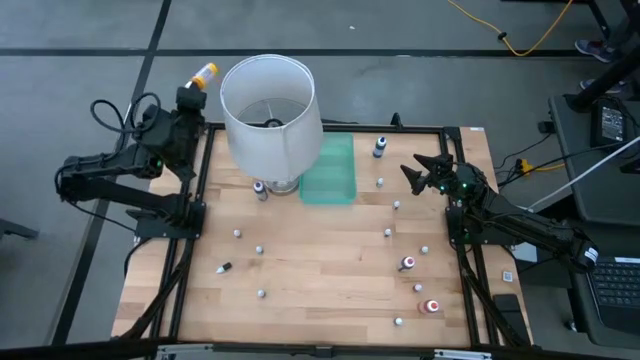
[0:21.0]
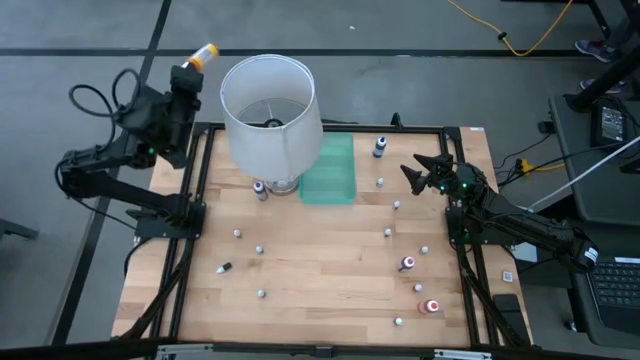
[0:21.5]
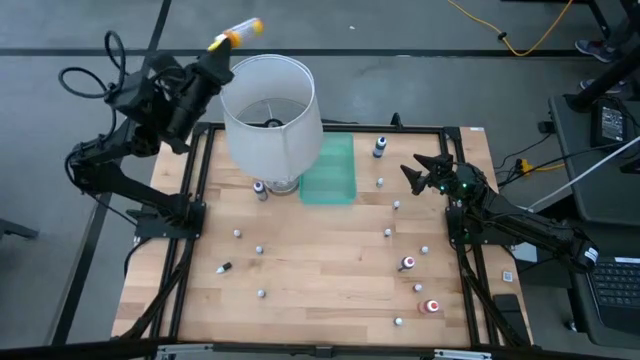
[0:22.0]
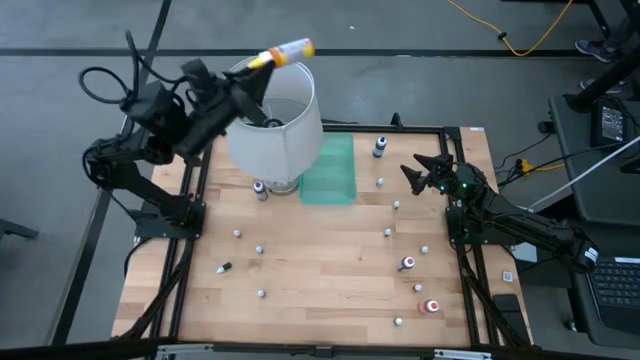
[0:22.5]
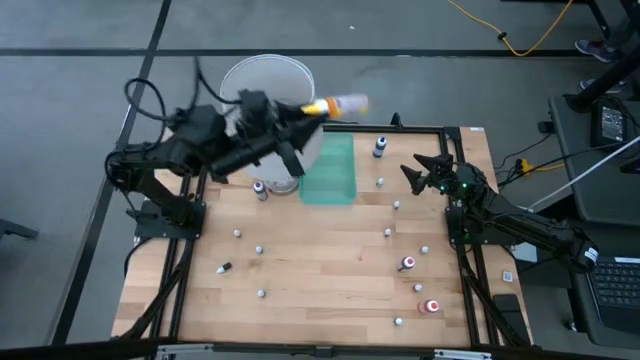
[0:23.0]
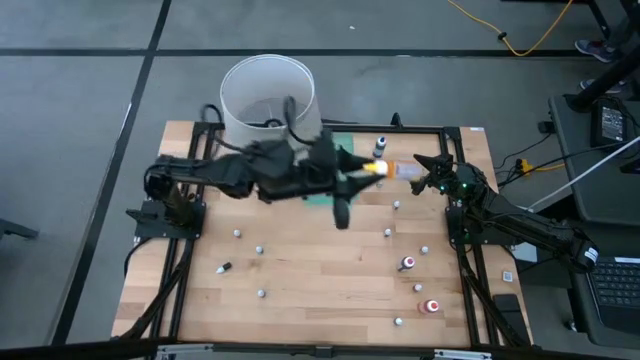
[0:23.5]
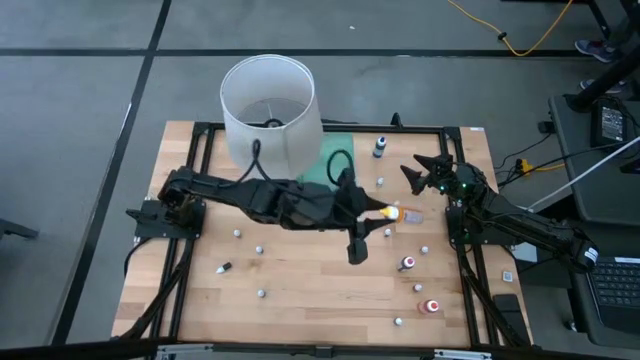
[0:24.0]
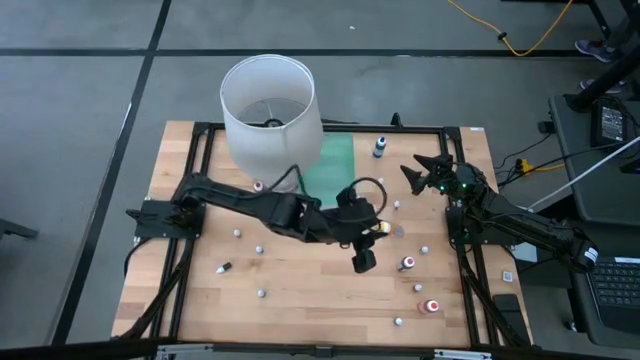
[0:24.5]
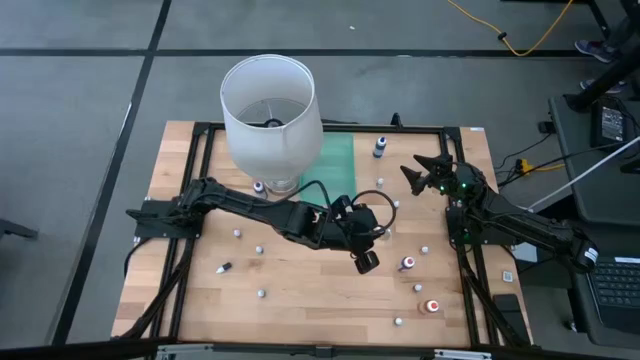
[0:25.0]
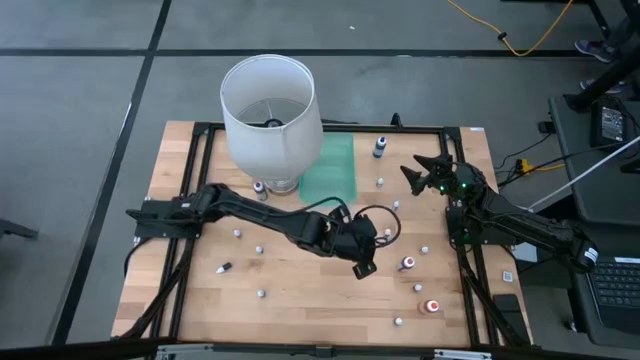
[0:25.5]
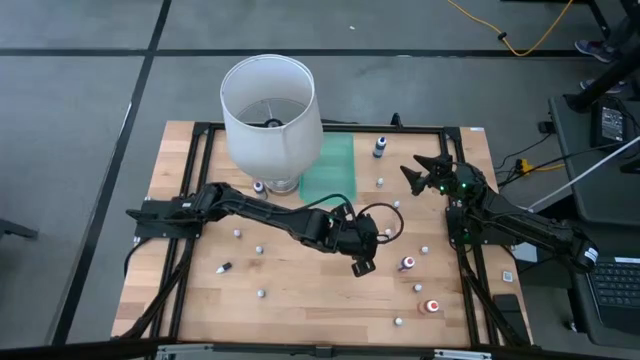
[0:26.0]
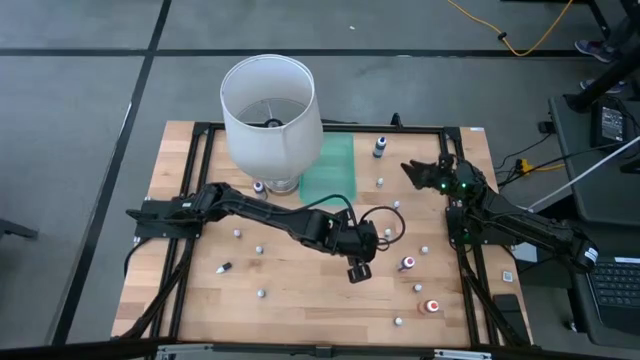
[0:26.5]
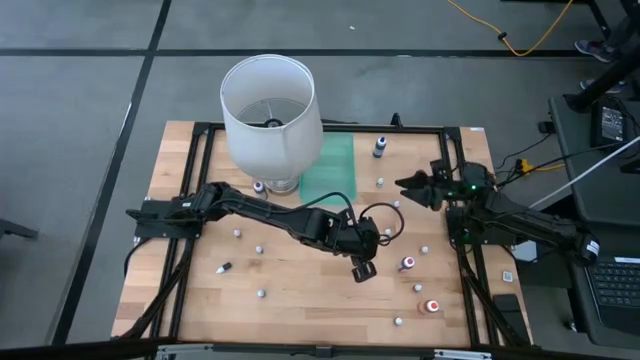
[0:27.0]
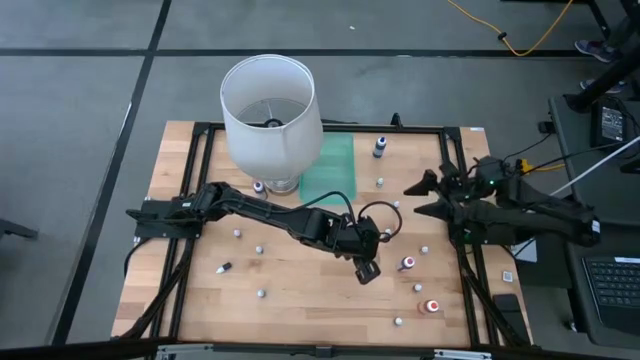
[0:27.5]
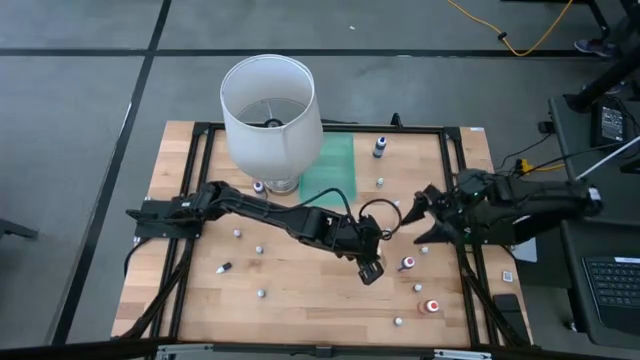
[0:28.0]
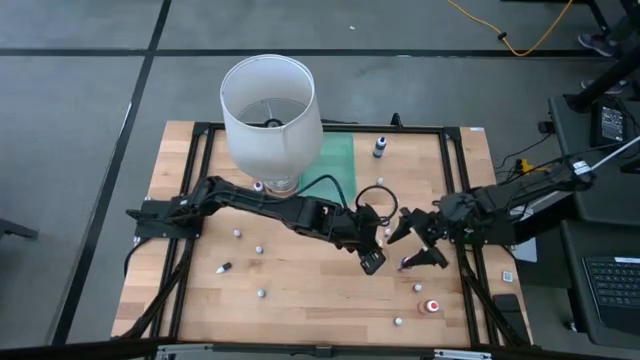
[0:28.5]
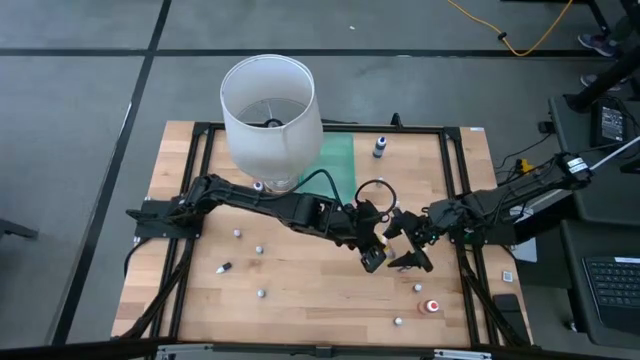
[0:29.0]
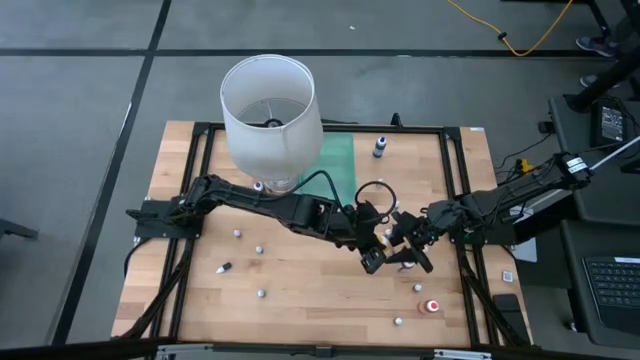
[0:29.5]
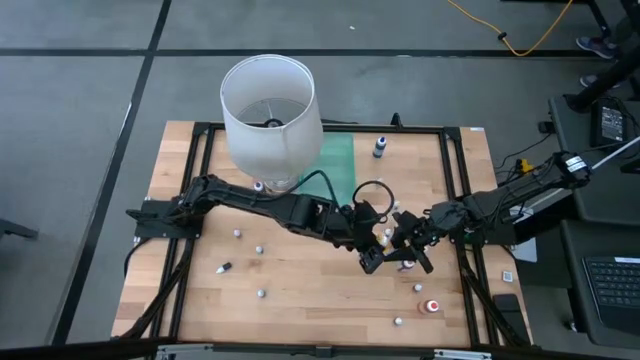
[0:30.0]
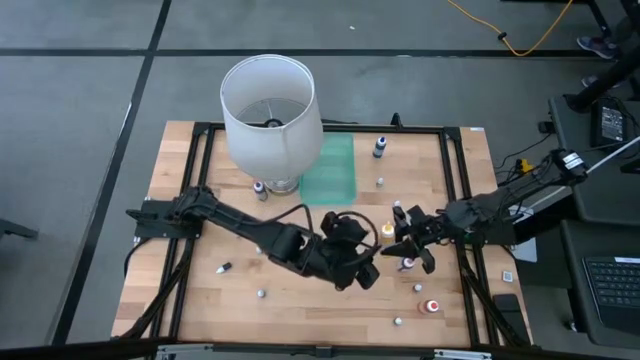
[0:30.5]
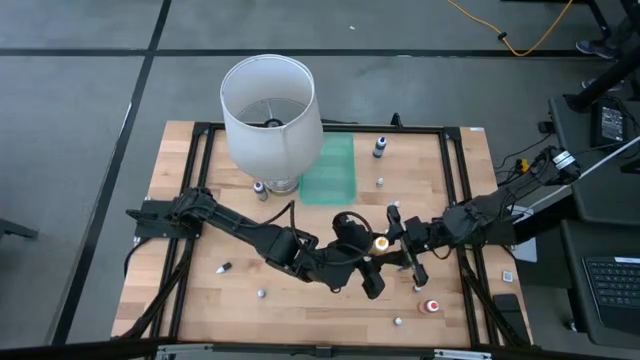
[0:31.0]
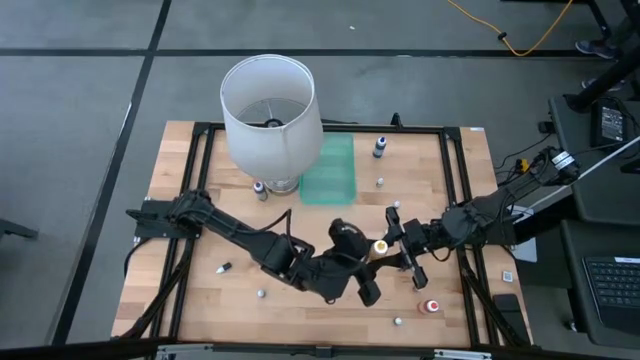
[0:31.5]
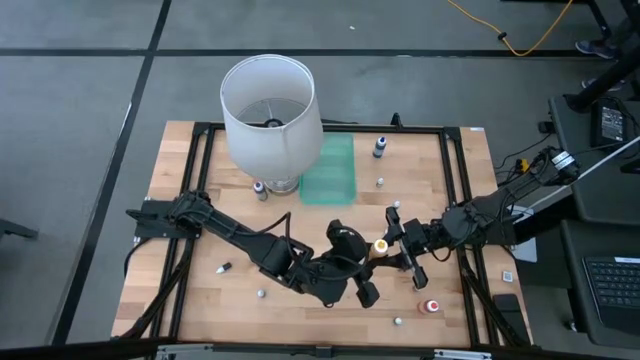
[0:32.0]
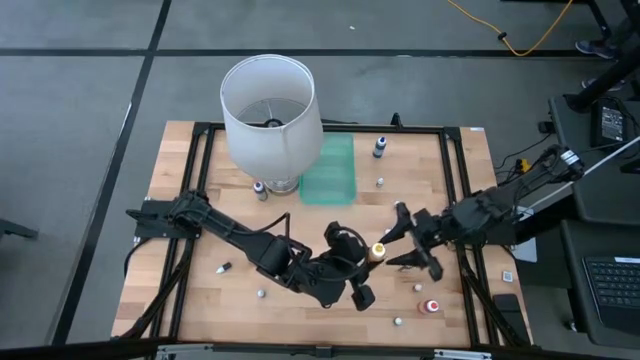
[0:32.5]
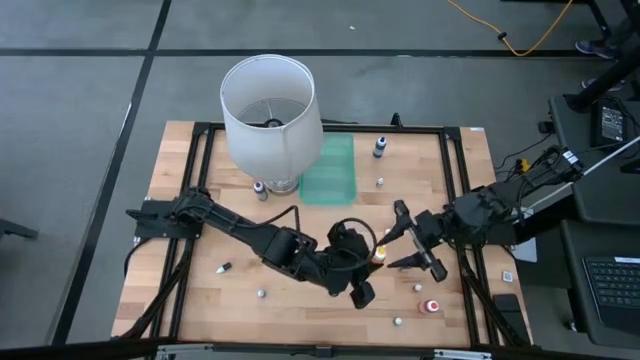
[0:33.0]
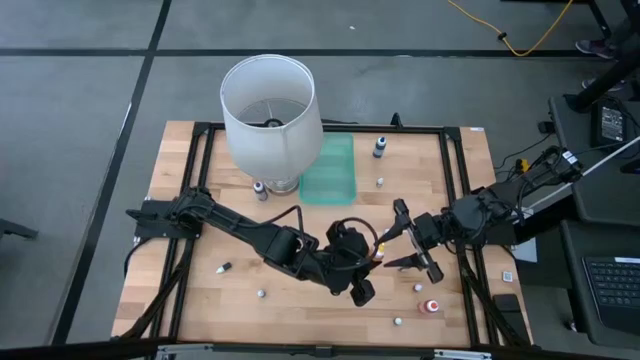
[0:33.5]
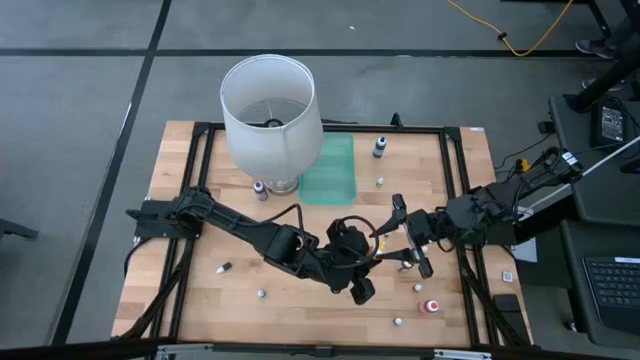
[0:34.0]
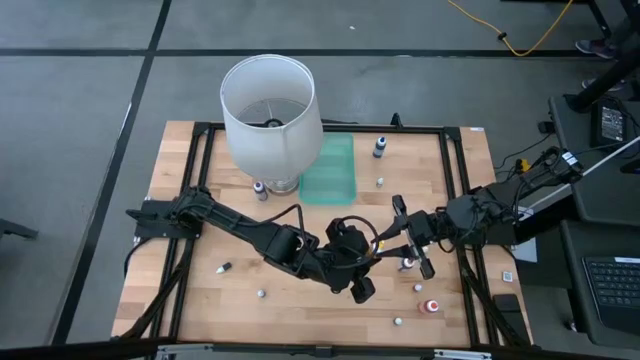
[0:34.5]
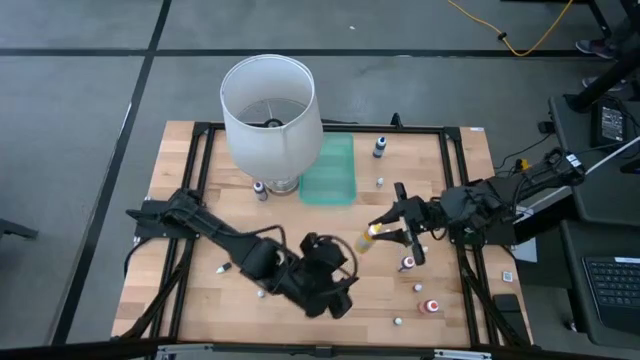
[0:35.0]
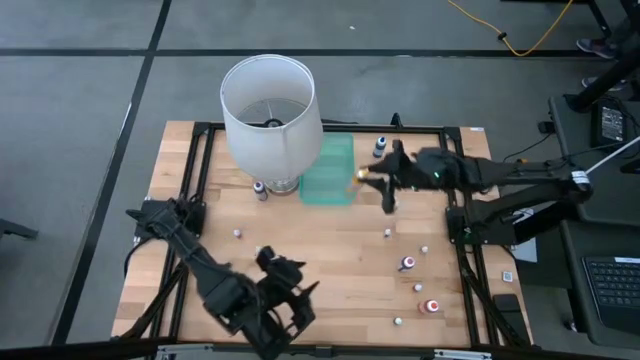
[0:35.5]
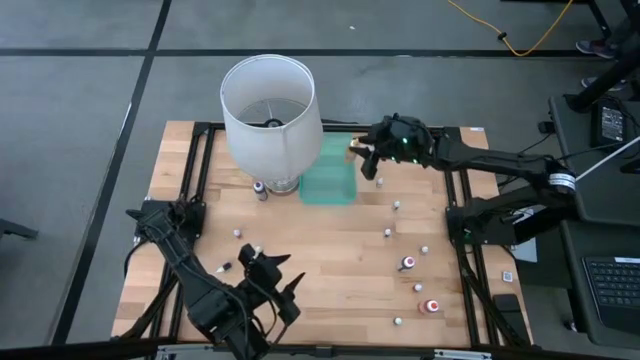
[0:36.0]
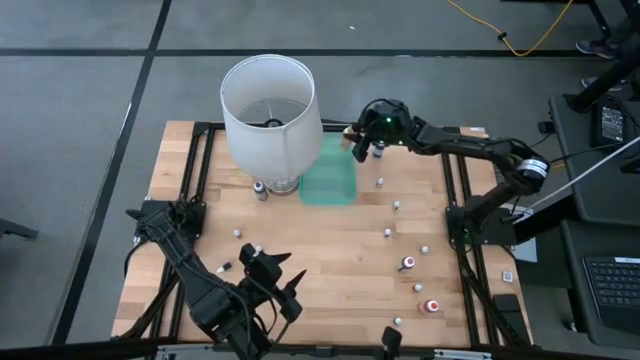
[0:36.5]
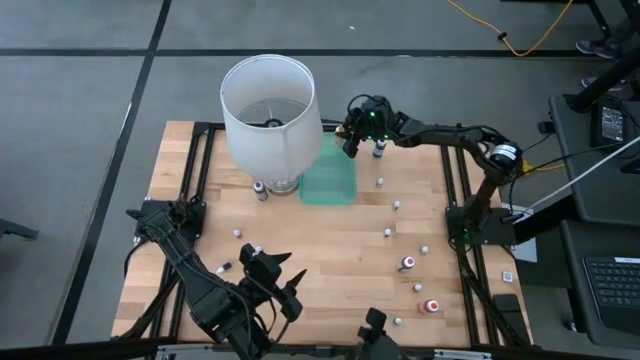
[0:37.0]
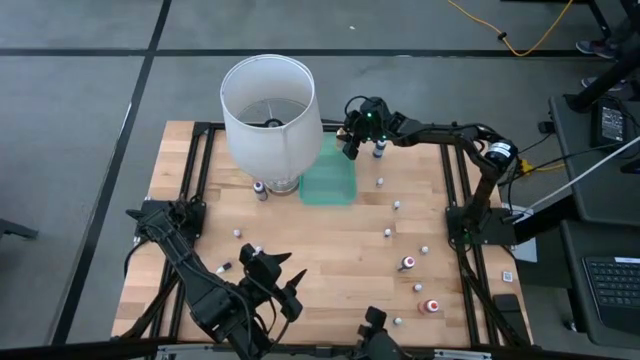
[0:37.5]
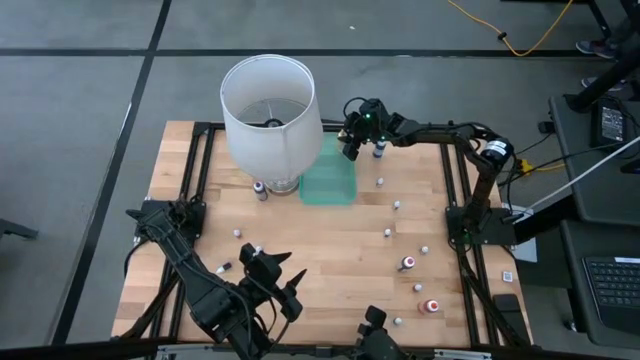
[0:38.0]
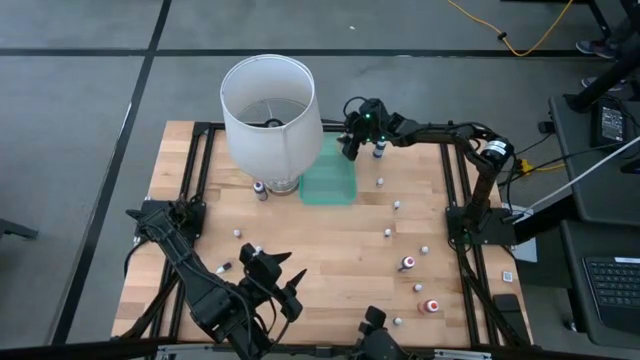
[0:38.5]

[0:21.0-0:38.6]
Task: Pick & Place food coloring
Put the large yellow food coloring bottle into the green bin

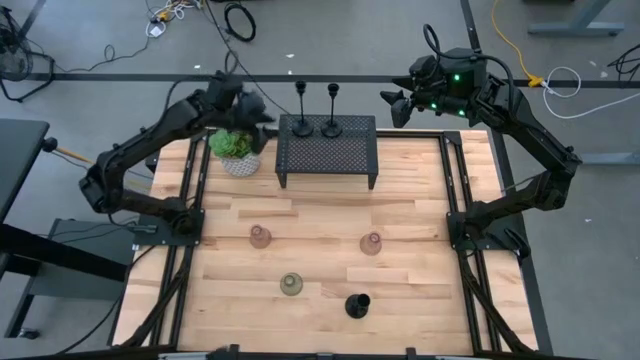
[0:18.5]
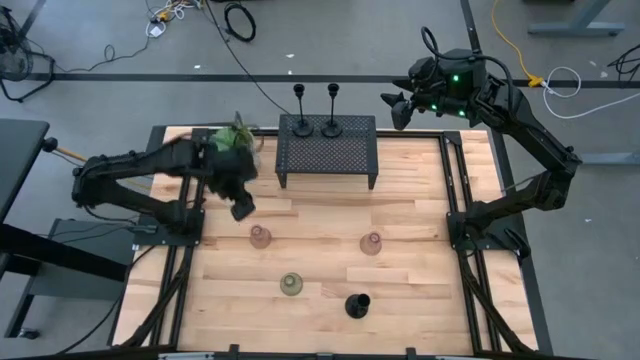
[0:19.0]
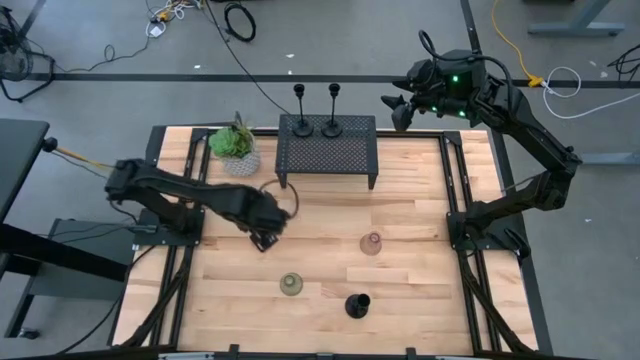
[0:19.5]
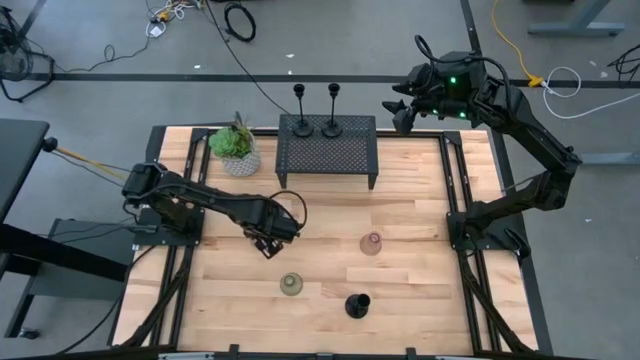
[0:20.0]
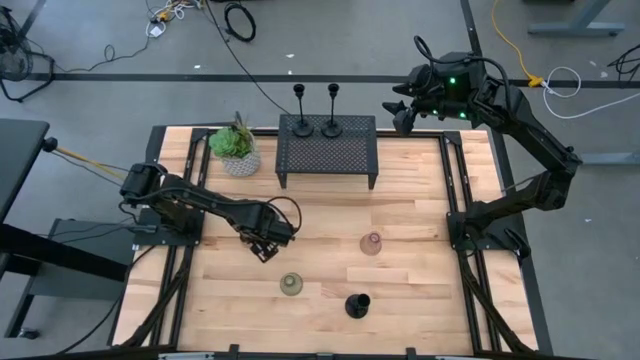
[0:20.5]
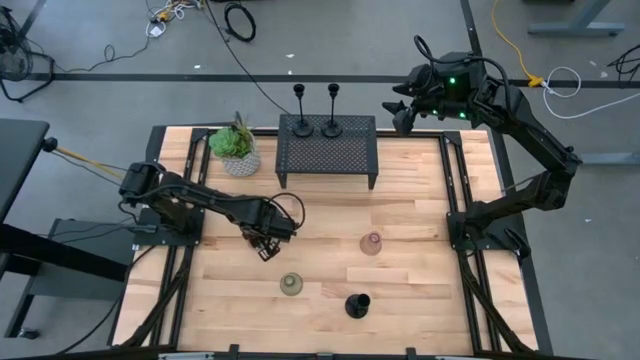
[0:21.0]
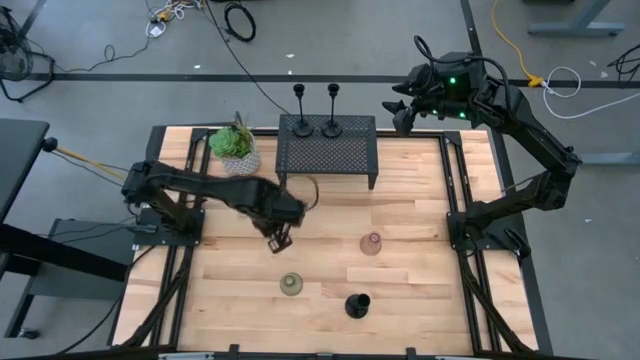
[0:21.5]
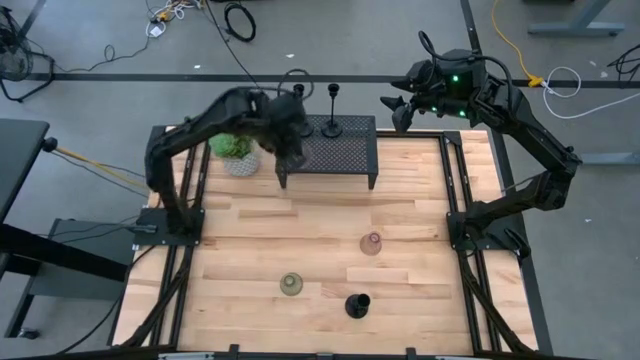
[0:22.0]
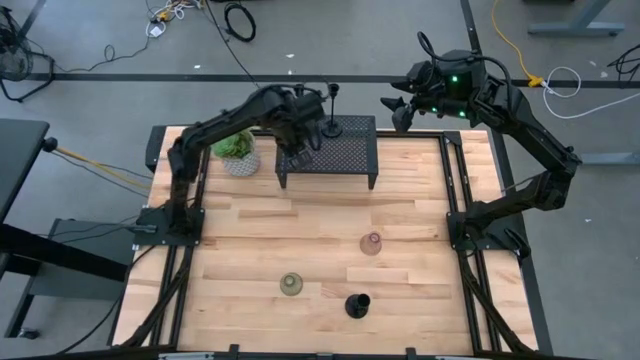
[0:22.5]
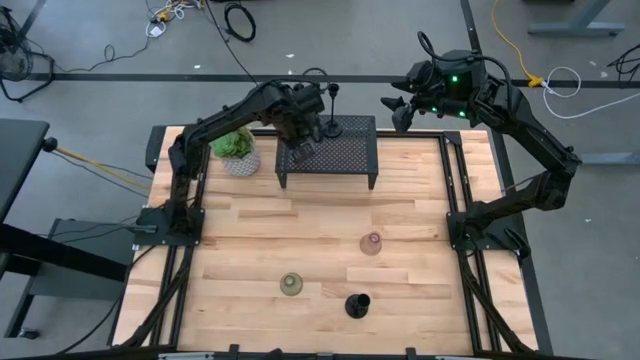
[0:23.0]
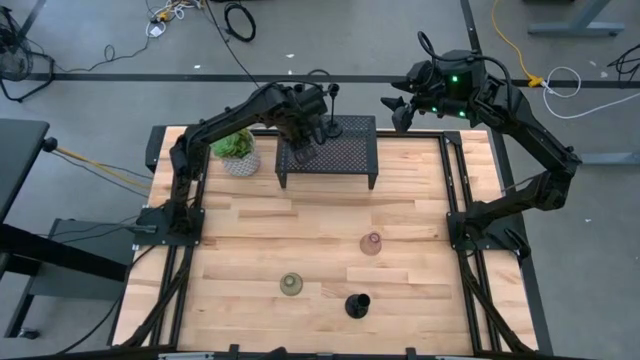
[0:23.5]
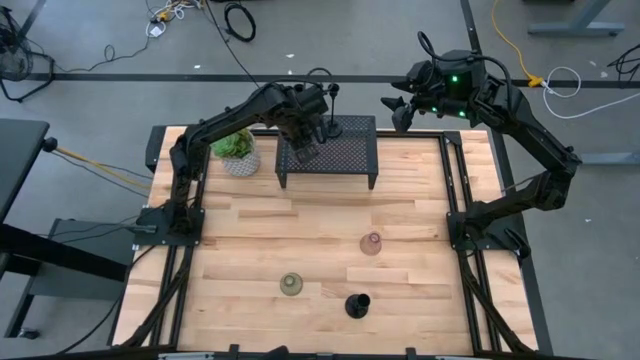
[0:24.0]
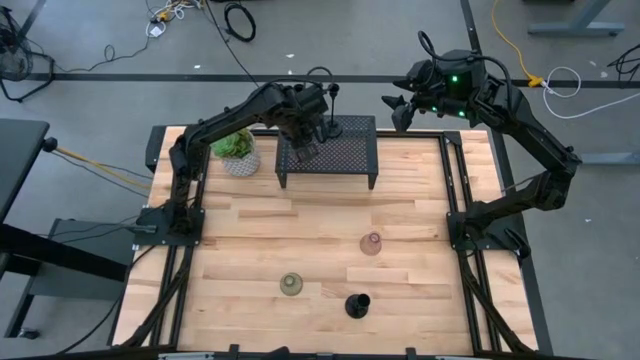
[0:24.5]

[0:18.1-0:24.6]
Task: Pick & Place candle stick holders
Put the left pink glass candle holder on the shelf
